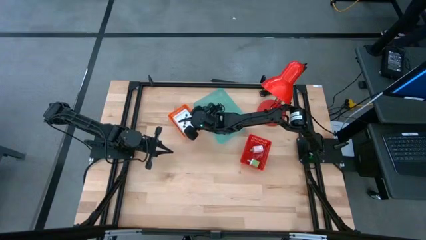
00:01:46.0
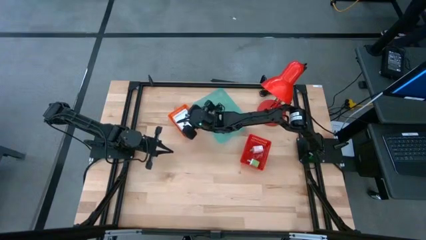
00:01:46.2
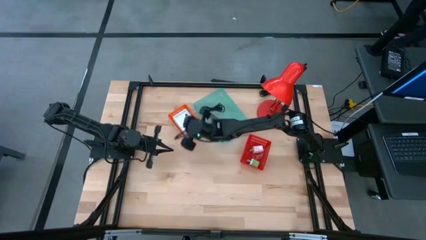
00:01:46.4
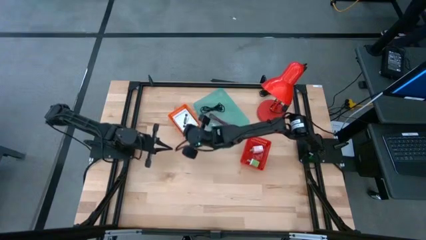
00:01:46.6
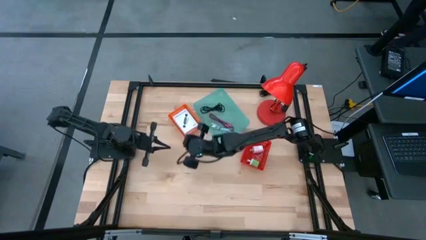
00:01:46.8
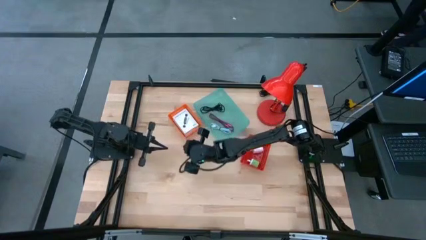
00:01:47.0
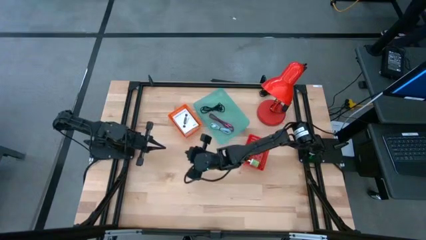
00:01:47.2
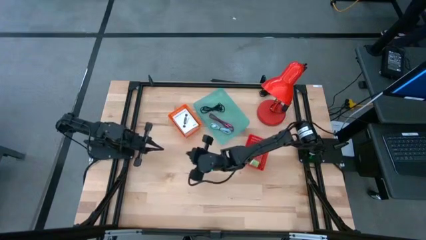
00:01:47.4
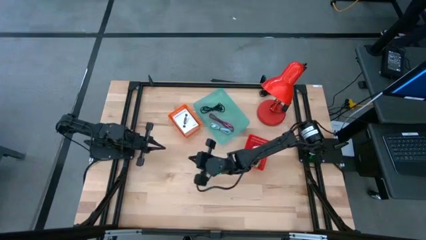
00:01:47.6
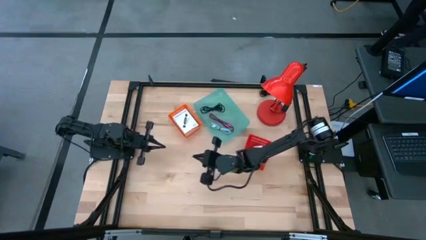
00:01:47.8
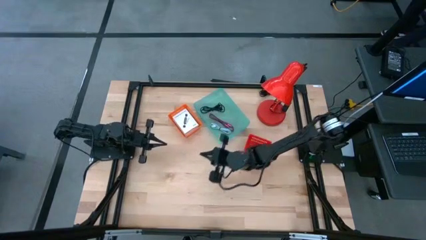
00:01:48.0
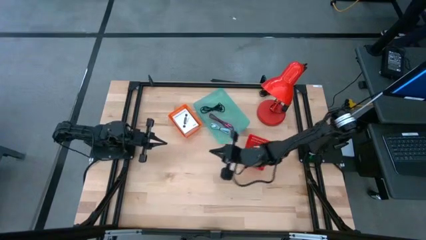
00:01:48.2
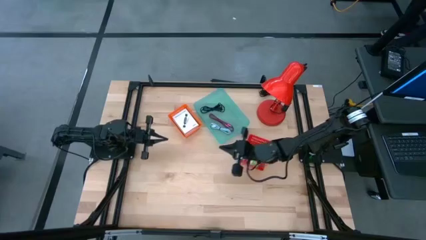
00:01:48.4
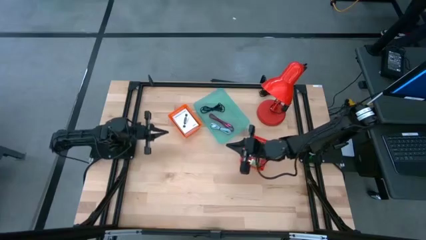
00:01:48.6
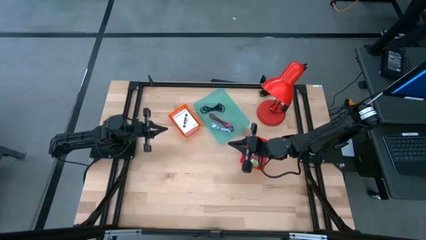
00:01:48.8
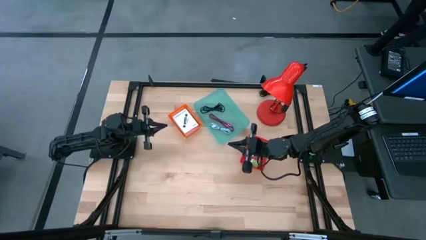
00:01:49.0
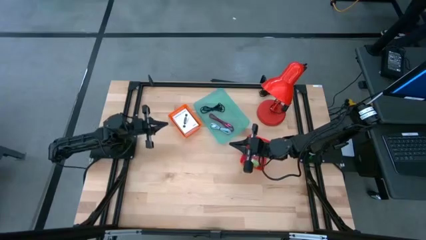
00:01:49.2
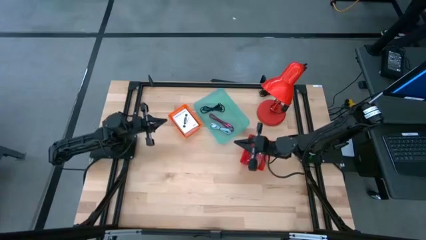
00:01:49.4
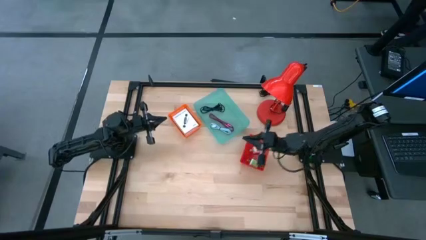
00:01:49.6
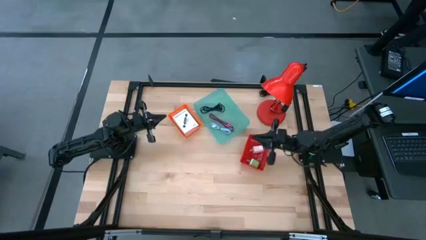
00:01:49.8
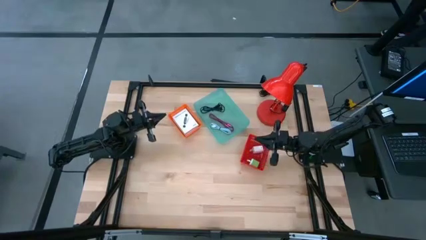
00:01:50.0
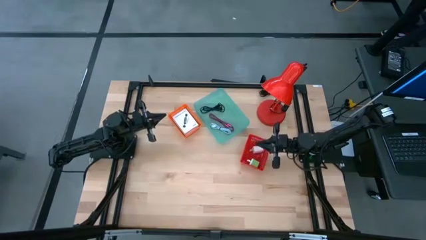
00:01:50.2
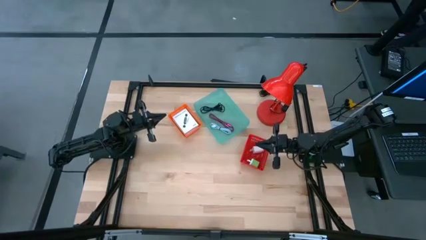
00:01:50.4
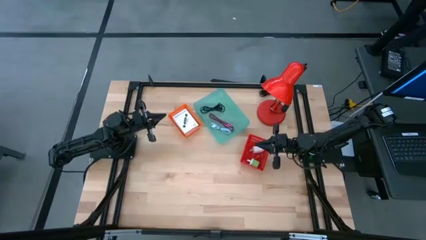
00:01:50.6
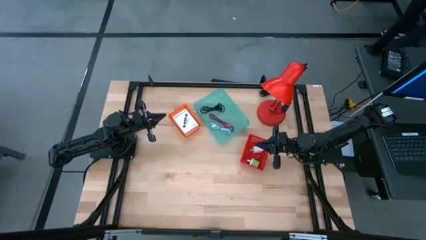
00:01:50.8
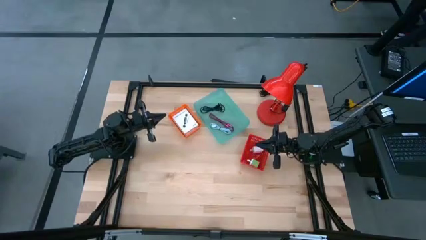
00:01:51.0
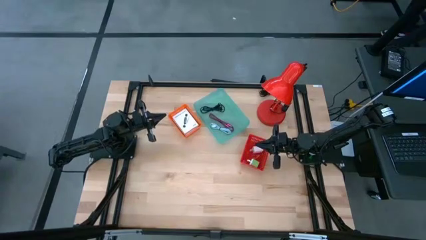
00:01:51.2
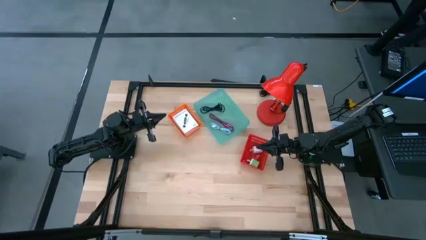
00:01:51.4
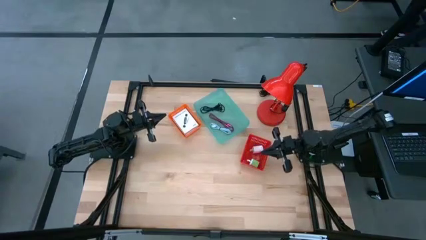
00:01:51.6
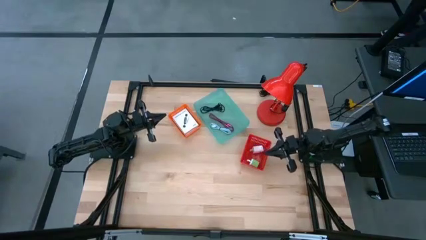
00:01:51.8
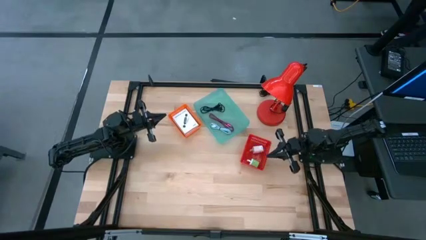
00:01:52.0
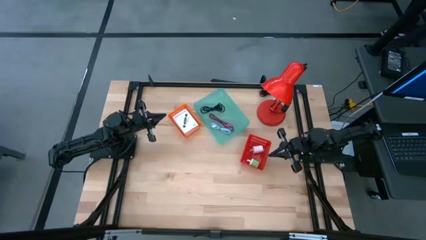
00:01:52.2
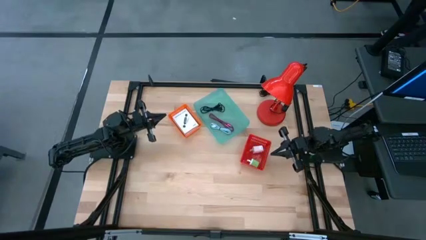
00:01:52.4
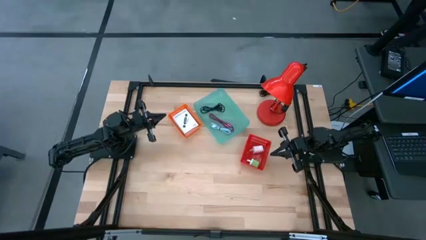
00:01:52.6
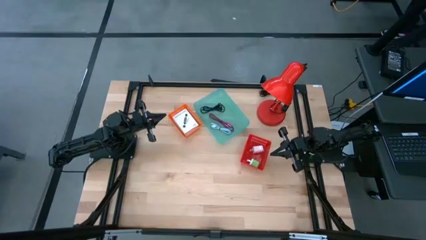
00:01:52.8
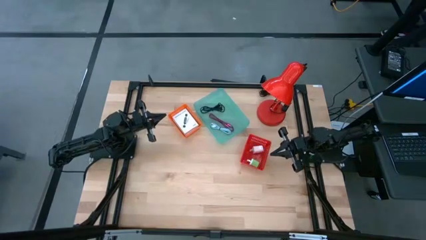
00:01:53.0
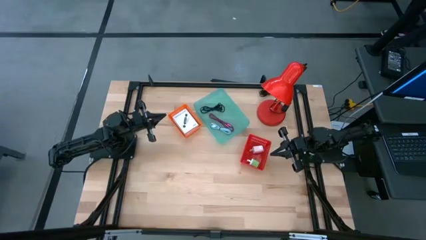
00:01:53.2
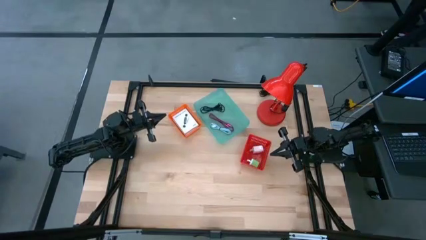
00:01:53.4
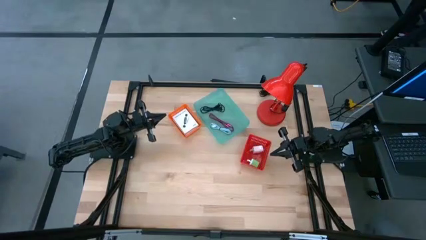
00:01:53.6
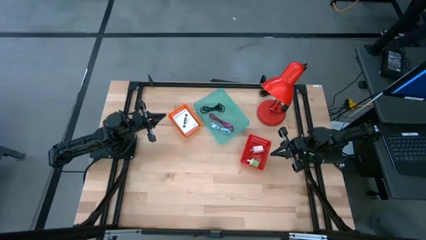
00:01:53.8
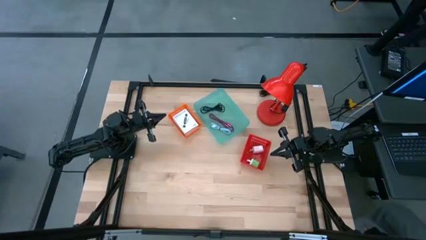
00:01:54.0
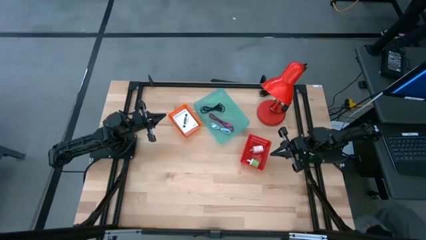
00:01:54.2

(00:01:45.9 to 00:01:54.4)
Task: Pick and place items into bin
Return to Home Position

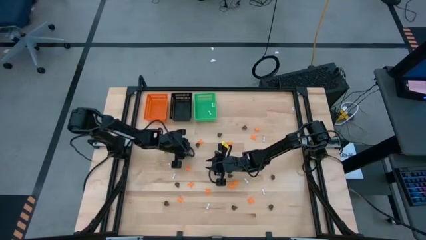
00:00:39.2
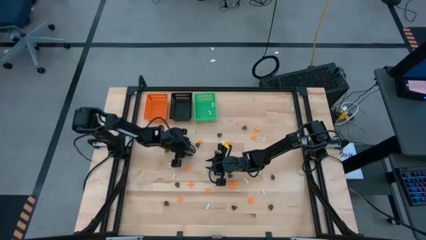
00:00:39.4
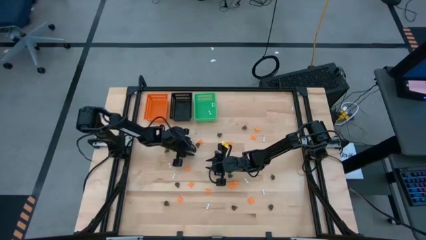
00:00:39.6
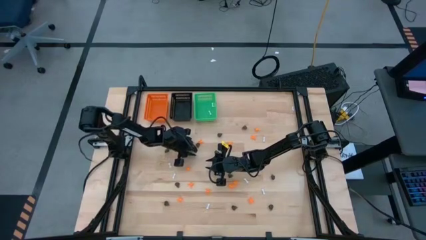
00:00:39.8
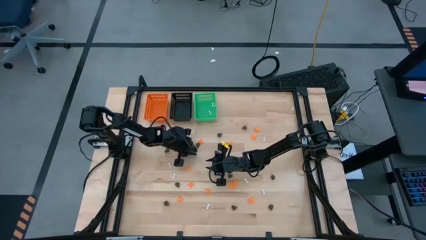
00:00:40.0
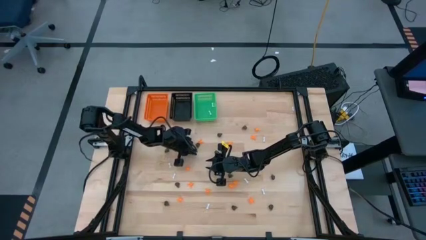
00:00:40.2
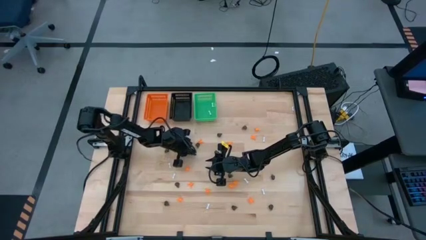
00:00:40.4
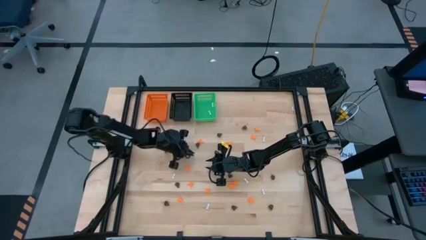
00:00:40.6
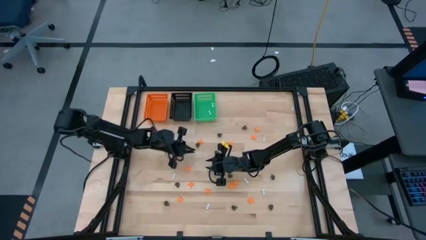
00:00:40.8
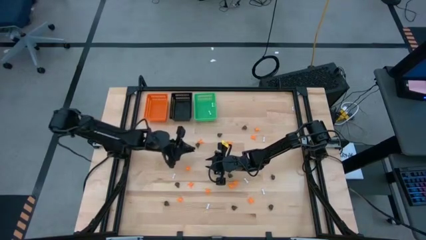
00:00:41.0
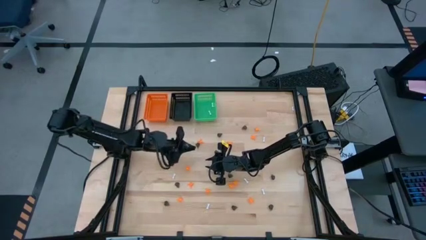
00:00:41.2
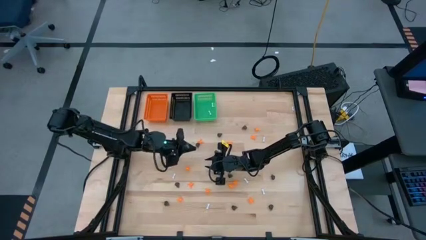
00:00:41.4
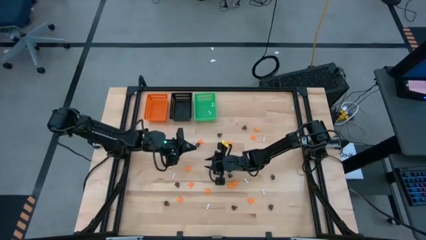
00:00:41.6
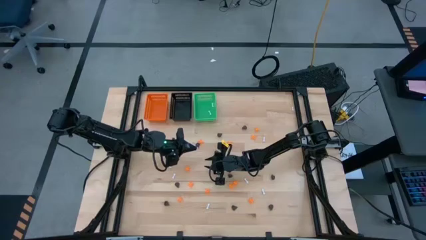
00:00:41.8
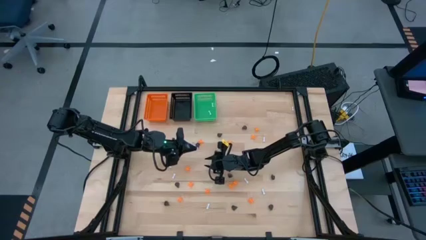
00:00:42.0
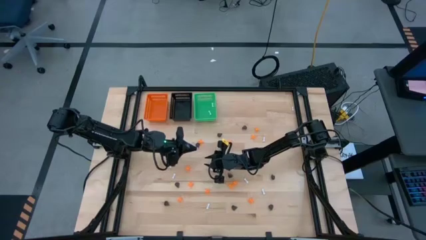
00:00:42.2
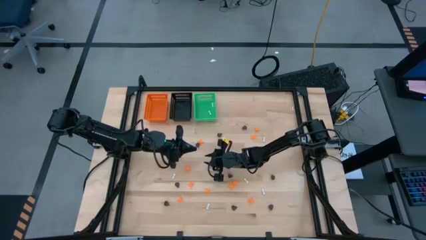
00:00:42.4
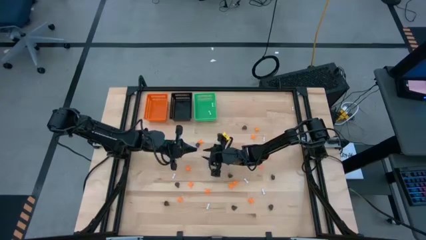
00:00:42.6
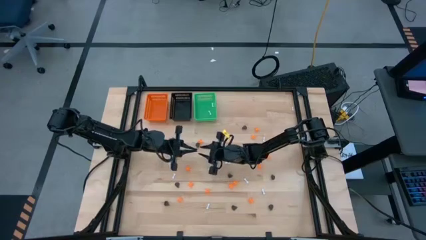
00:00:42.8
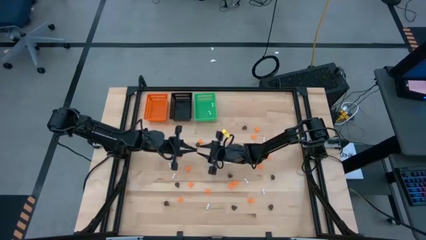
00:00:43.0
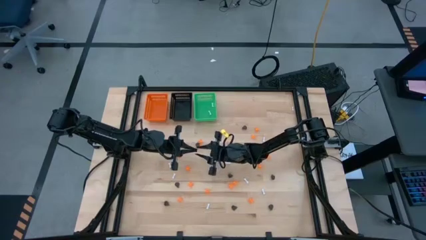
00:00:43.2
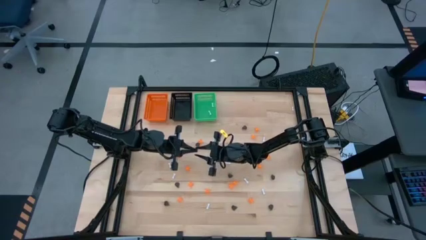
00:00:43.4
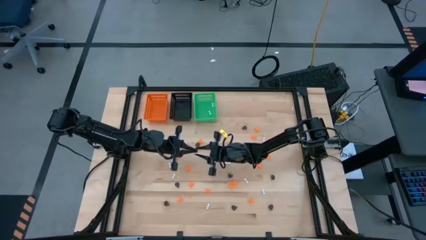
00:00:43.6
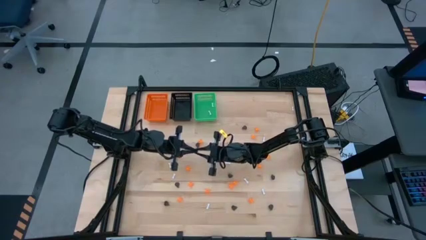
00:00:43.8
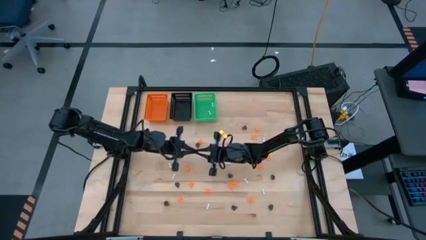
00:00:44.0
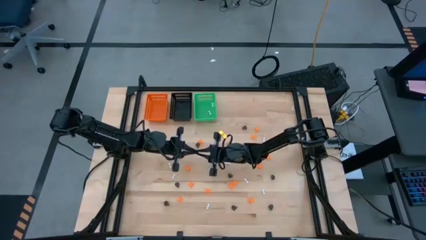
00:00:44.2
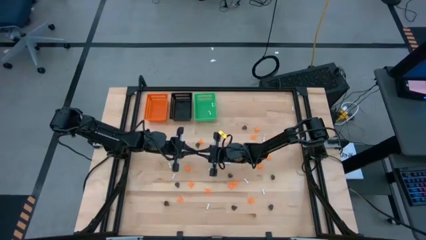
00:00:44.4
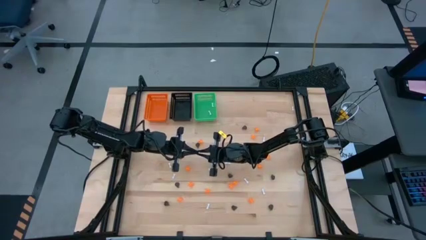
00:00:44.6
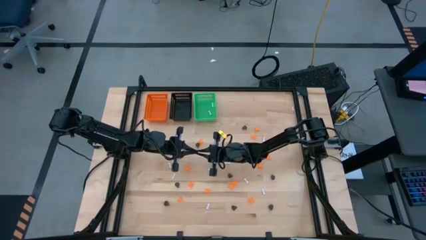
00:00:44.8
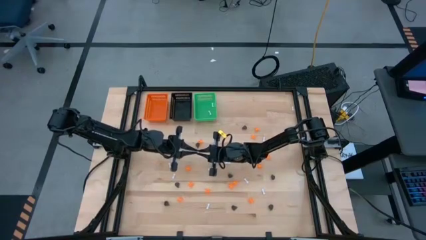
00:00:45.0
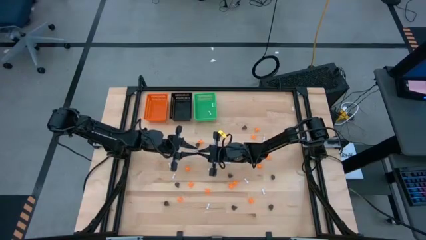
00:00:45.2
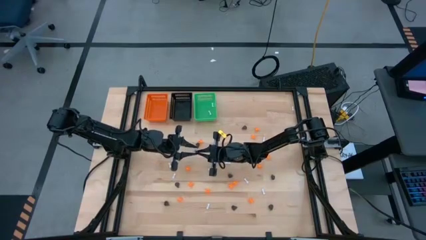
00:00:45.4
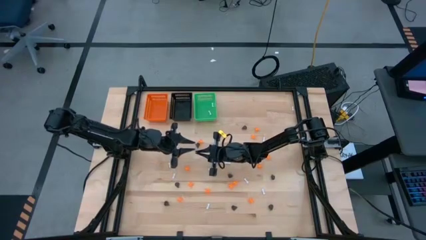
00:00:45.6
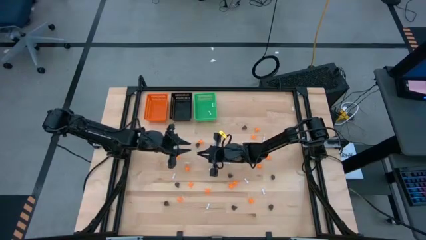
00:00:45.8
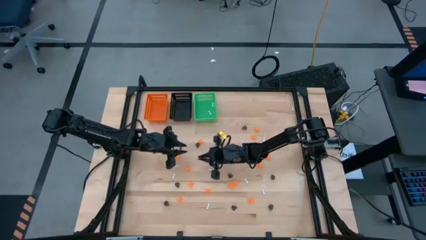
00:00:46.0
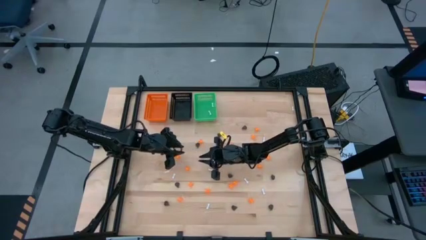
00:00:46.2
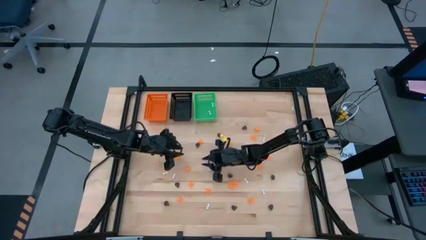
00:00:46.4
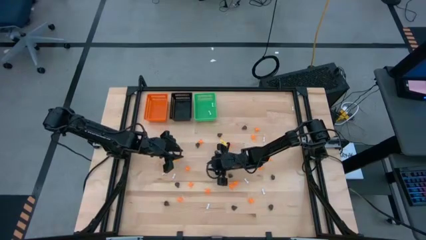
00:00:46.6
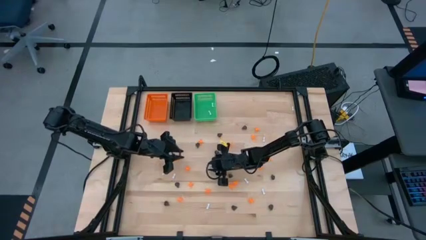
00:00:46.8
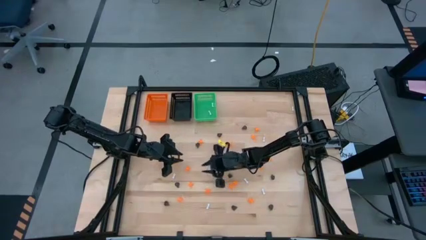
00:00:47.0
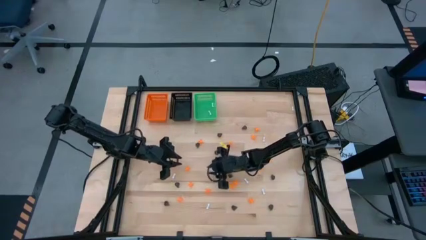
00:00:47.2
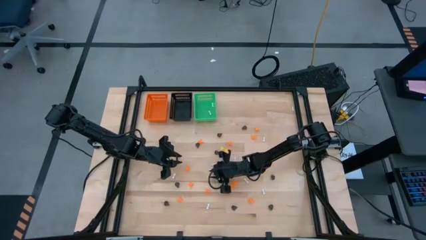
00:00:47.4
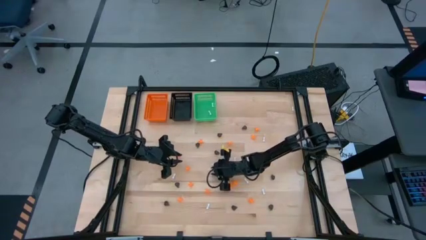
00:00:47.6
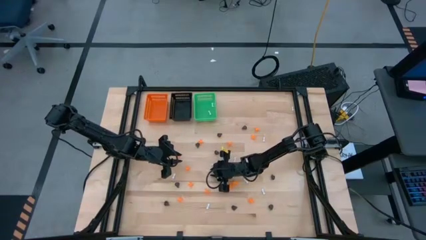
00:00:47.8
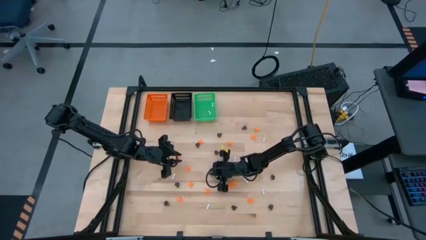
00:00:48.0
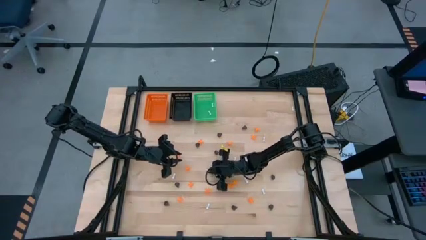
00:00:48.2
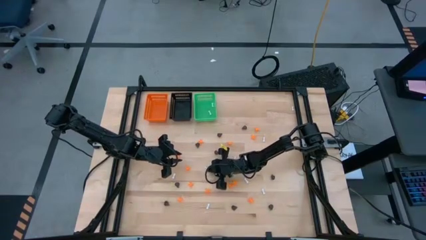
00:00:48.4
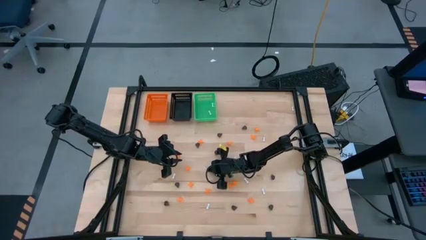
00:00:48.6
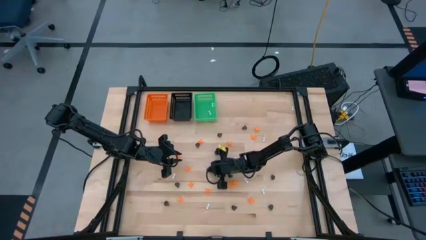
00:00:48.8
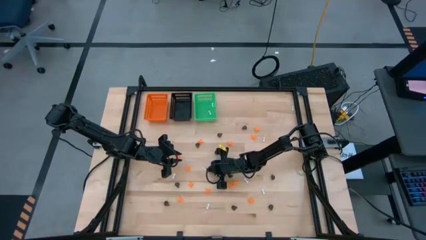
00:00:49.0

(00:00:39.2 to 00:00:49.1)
Task: Sort Halloween decoration
Put the white bone toy into the green bin
